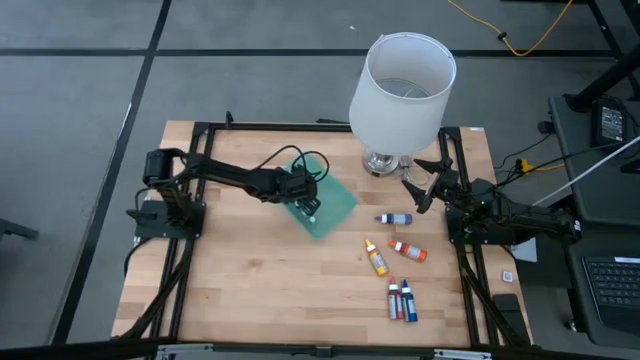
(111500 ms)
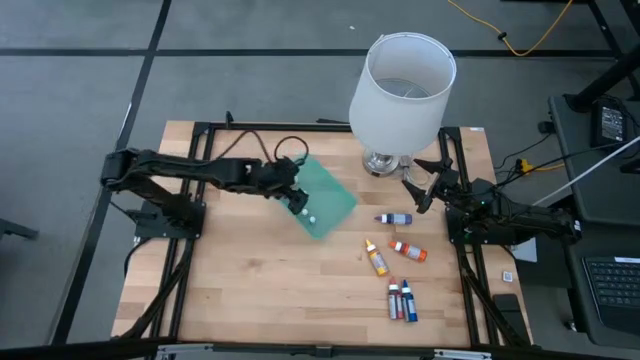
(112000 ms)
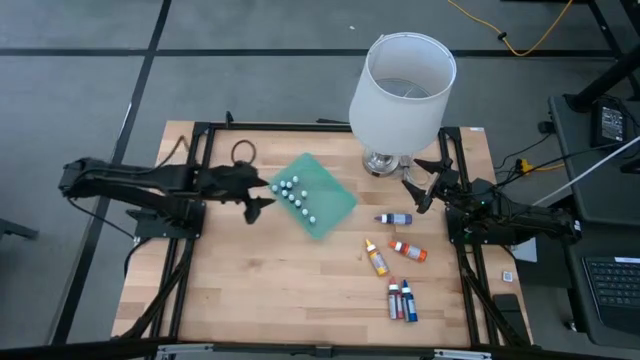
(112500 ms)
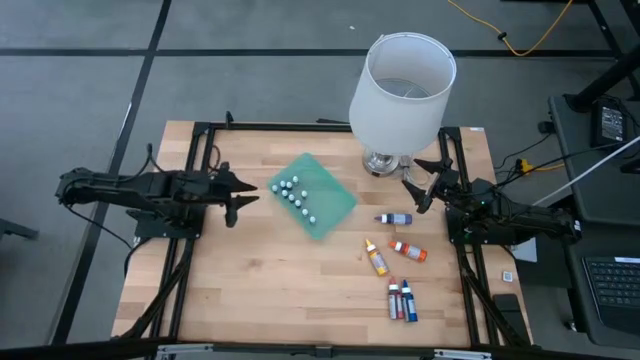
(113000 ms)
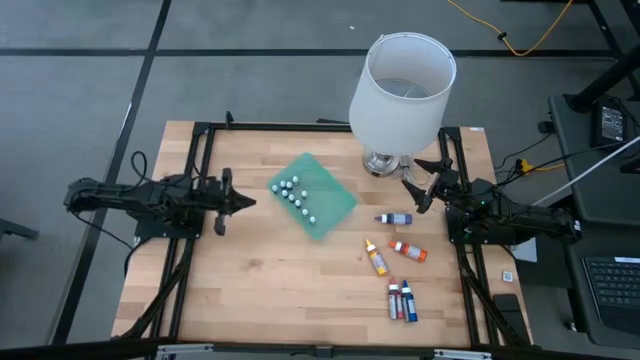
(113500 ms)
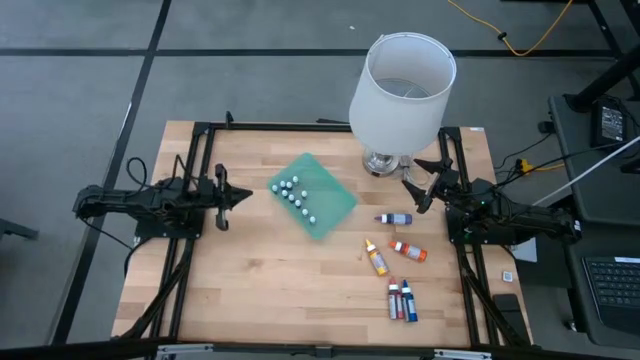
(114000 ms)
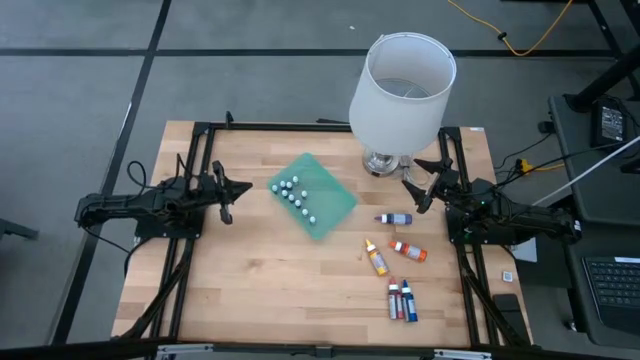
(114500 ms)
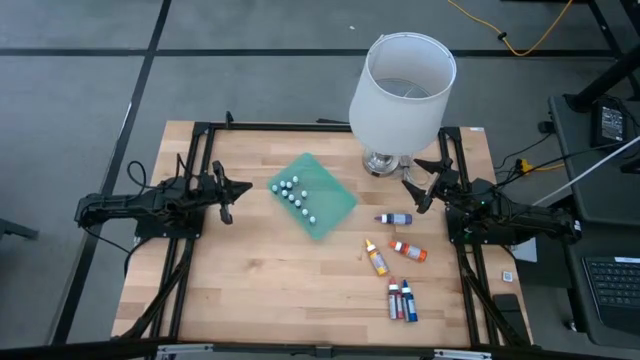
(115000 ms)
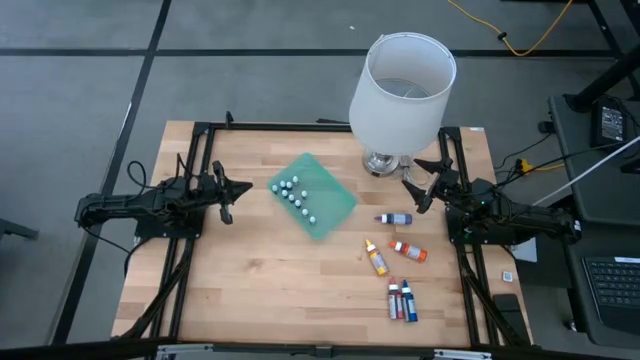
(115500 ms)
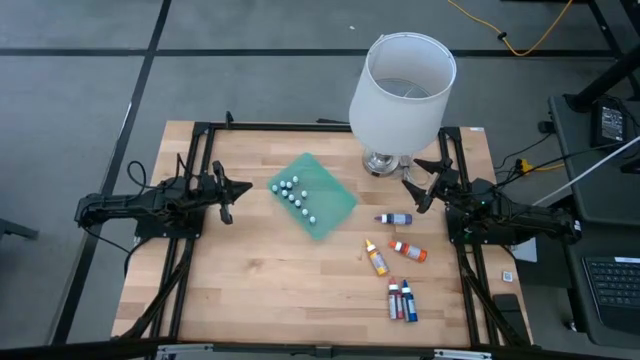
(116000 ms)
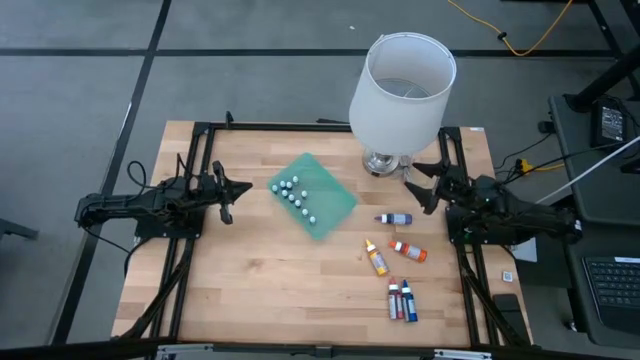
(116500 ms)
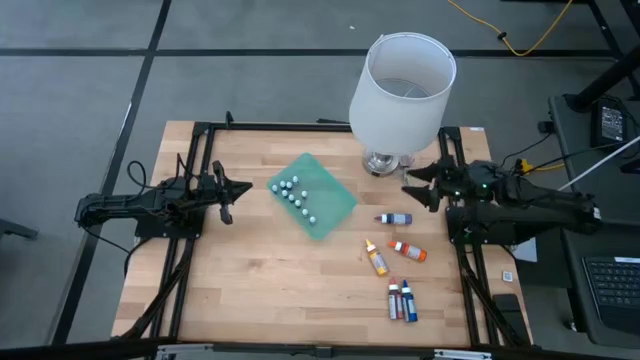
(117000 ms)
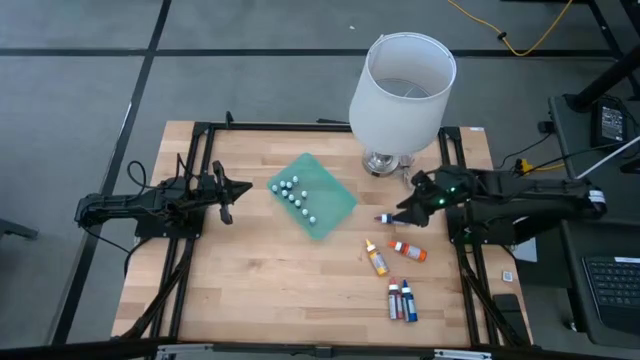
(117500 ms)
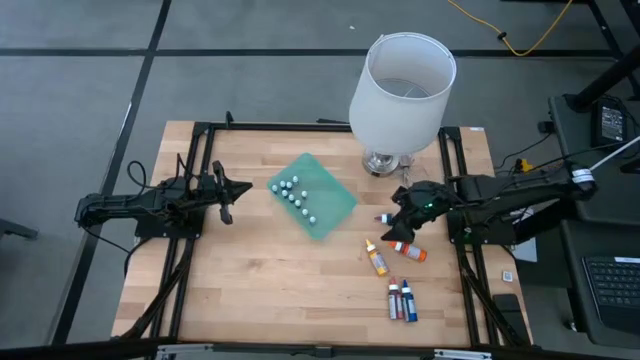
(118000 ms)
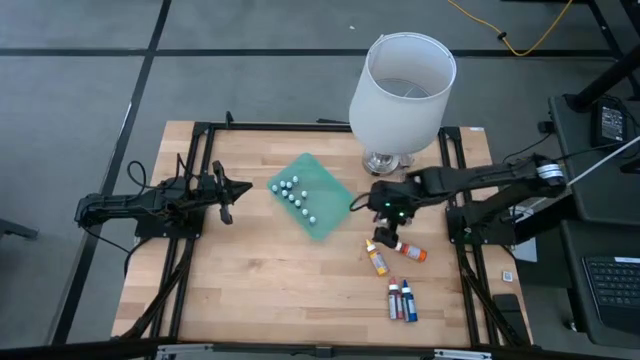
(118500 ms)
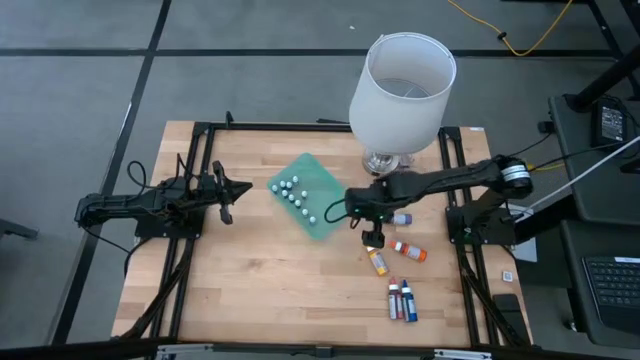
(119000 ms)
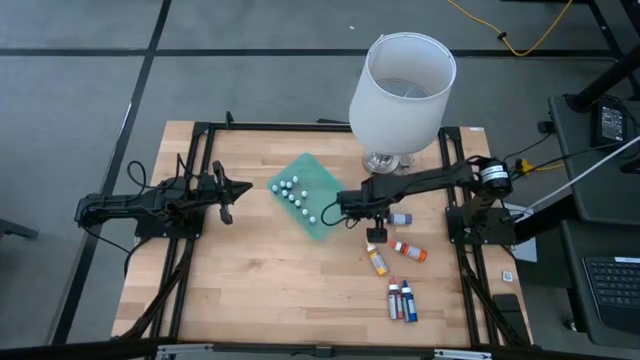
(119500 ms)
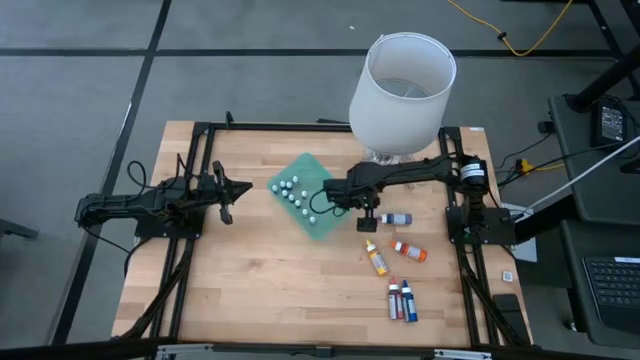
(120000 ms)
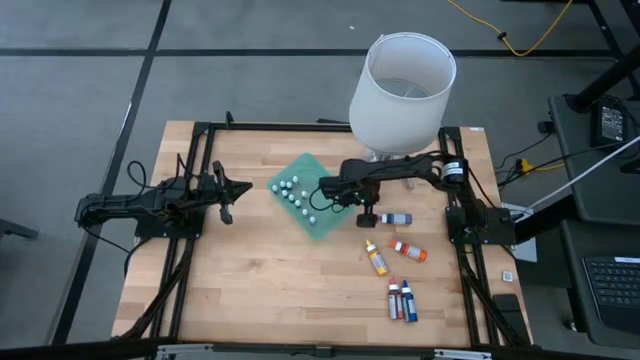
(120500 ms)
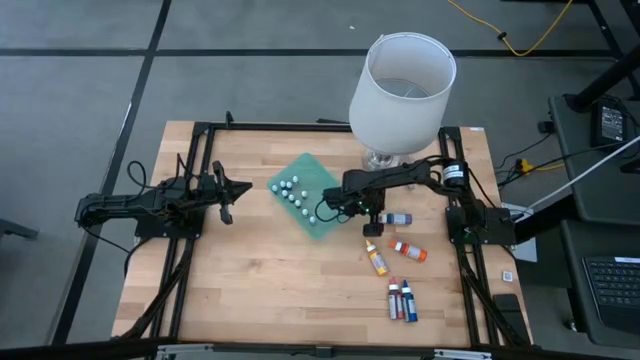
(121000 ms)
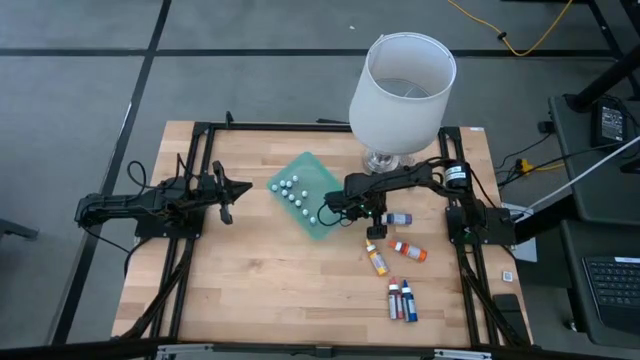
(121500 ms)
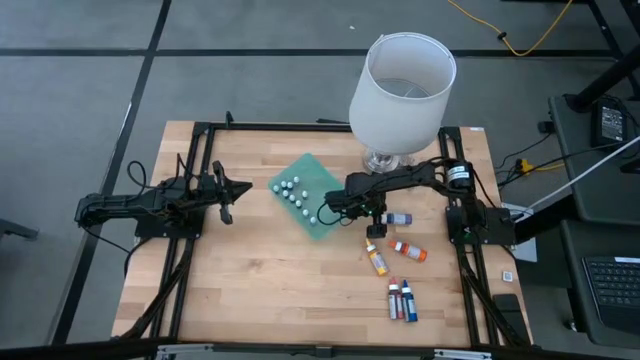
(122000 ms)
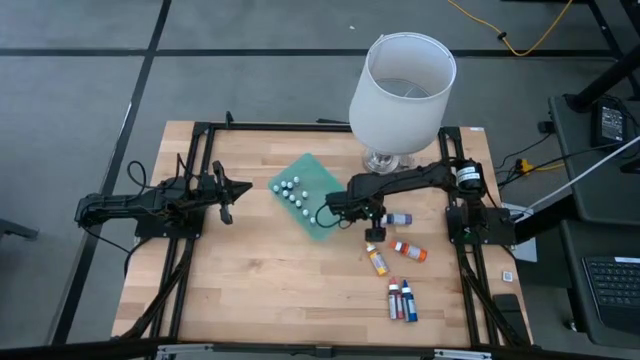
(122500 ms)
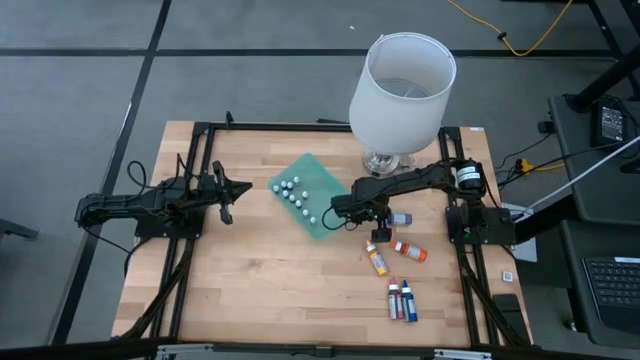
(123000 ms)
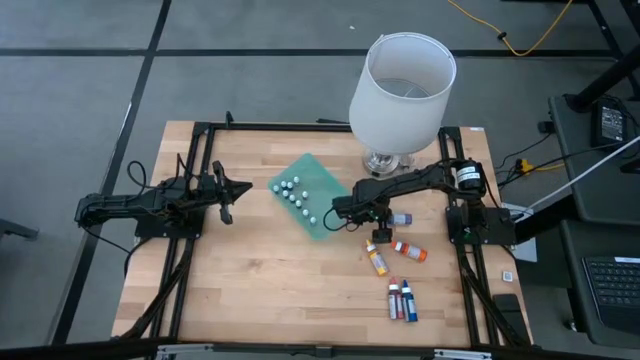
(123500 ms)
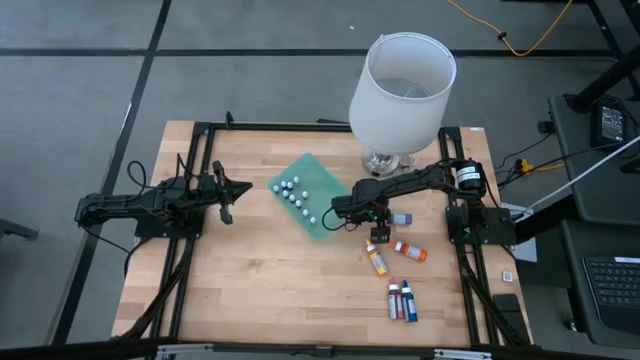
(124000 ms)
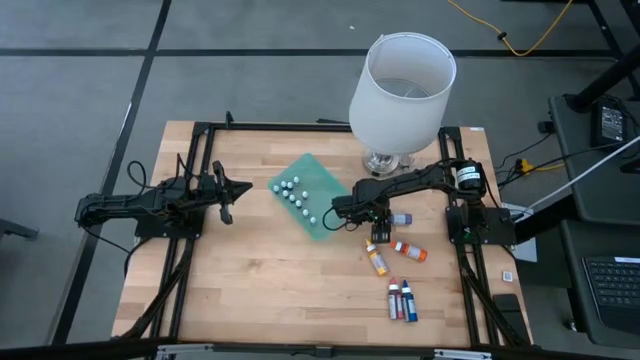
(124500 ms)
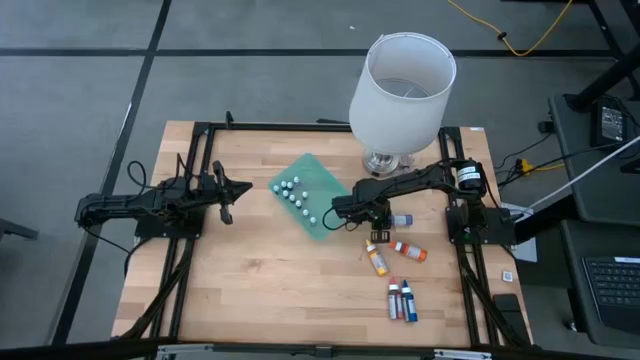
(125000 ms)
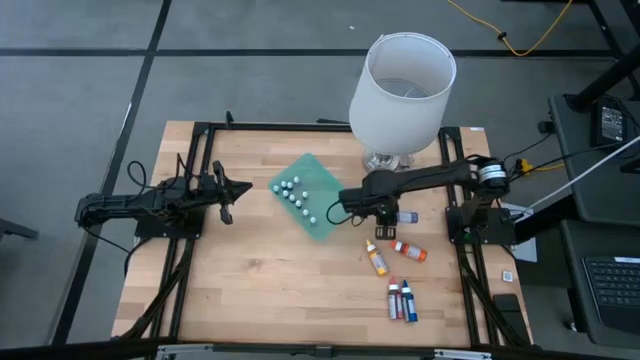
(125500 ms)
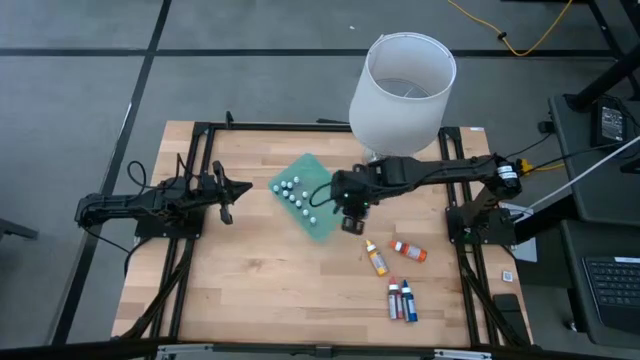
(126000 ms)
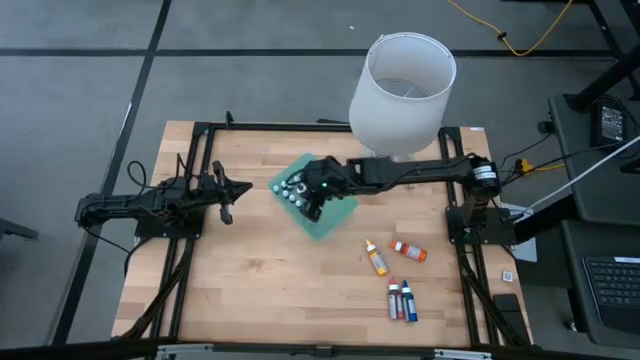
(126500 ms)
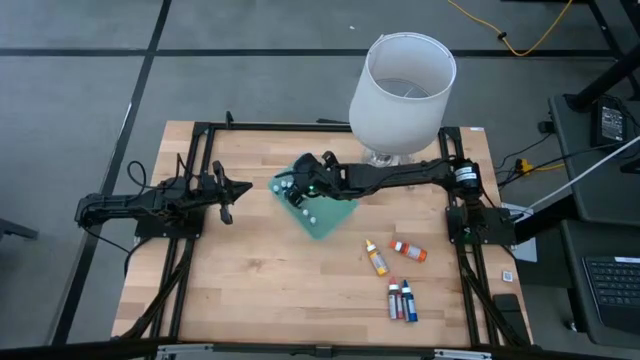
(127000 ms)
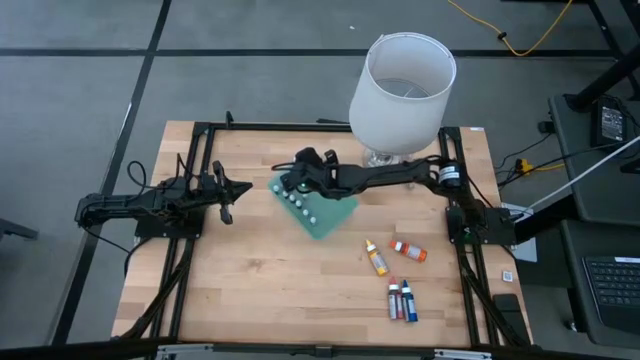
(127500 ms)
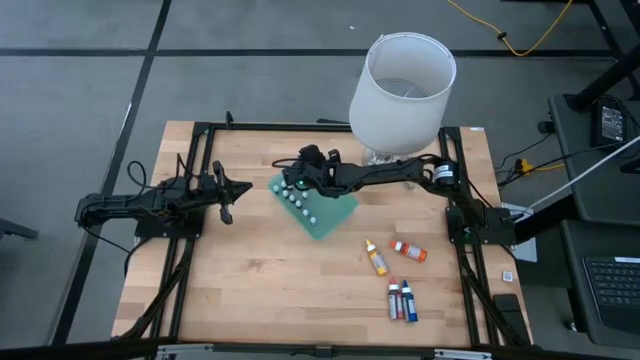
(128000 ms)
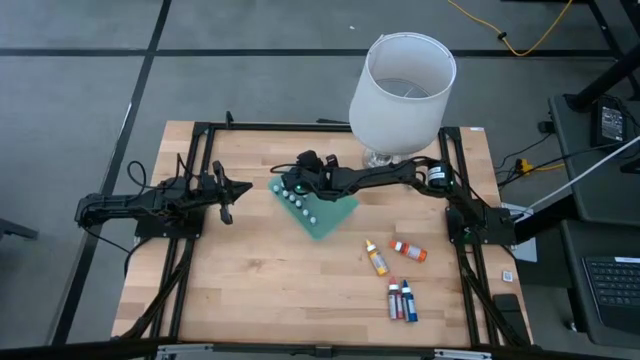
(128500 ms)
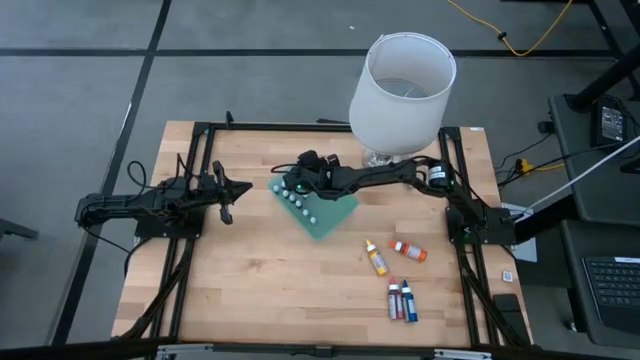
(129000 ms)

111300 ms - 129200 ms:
Task: Pick & Place food coloring
Put the large purple food coloring bottle into the green bin

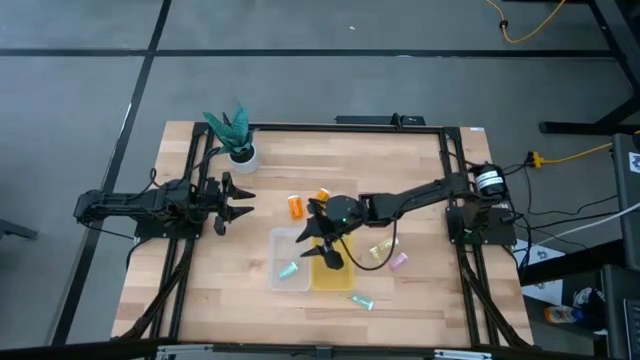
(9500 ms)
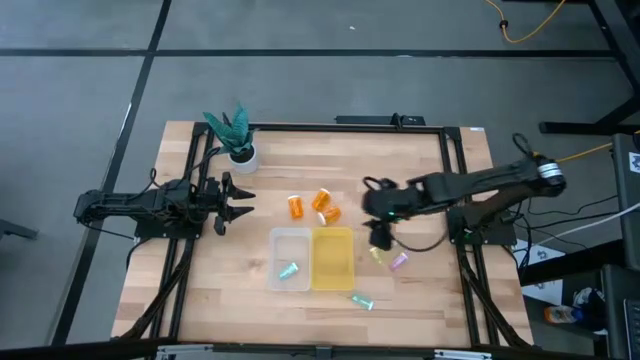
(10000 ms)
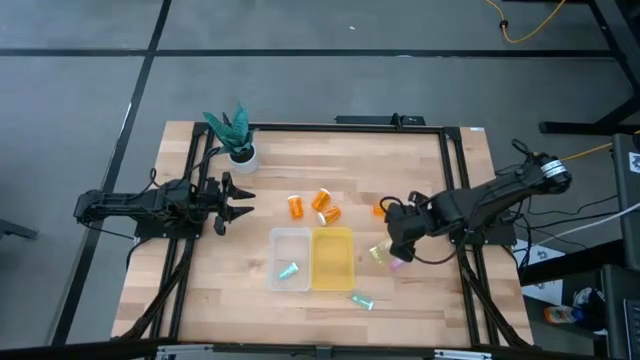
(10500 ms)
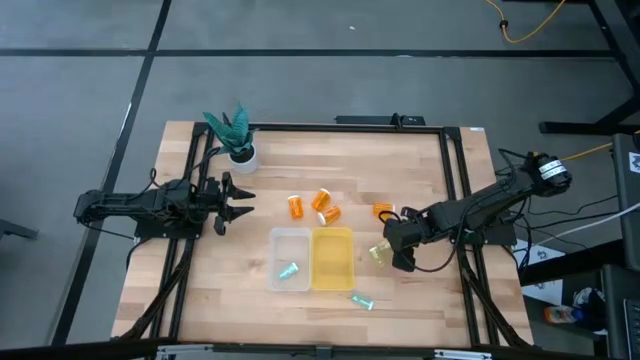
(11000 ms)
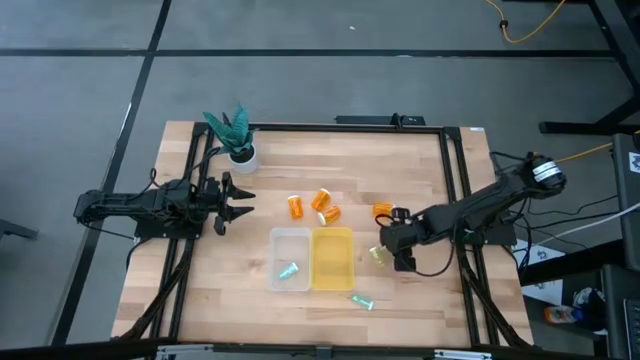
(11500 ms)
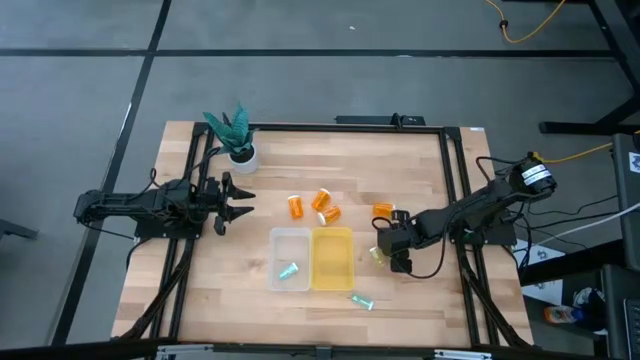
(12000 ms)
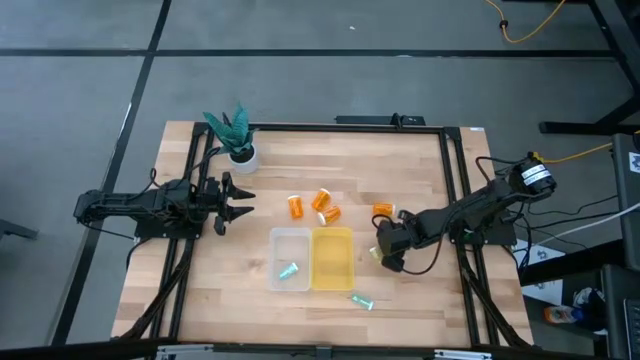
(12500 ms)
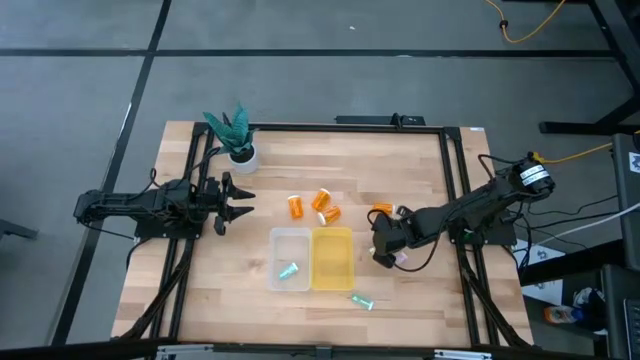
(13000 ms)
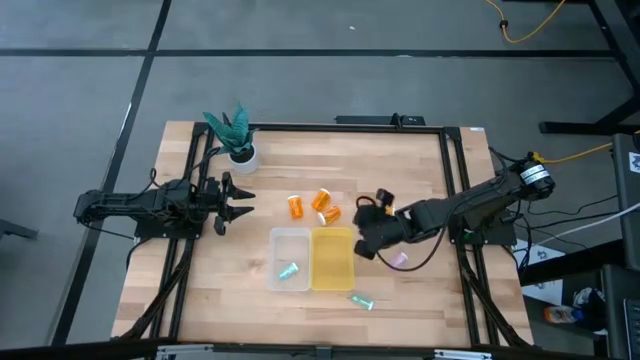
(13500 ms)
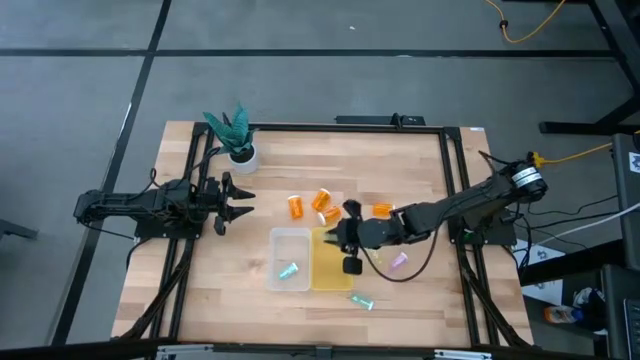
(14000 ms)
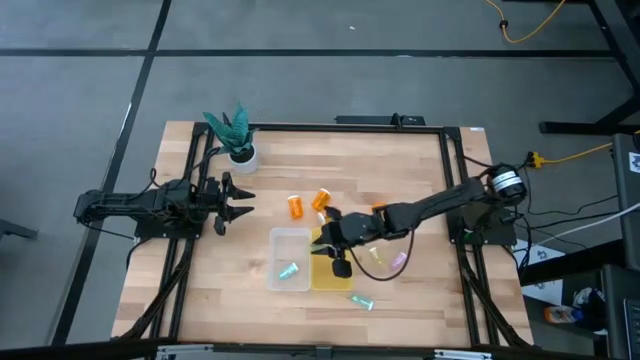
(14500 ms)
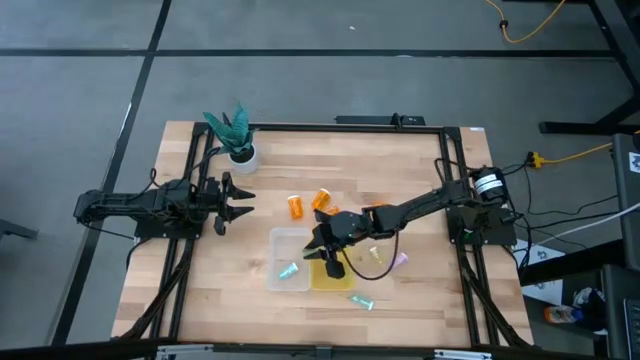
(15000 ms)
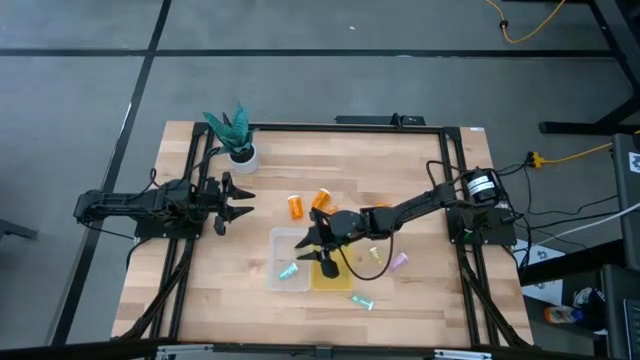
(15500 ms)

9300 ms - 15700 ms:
Task: Pick and place medicine bottles into bin by pill shape (circle, oval)
Put the yellow tablet bottle into the transparent bin
